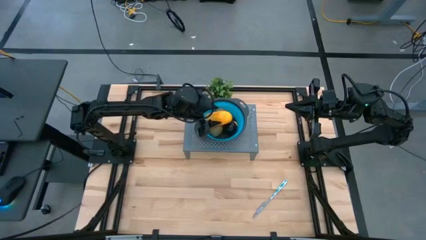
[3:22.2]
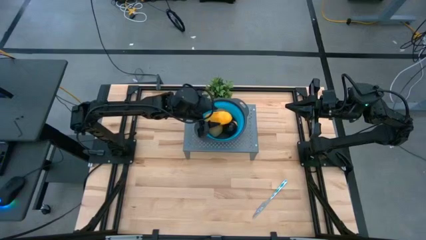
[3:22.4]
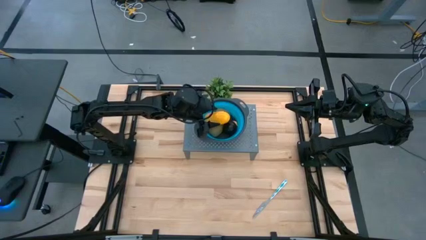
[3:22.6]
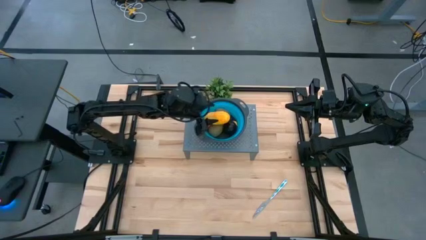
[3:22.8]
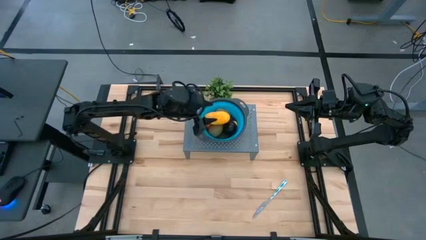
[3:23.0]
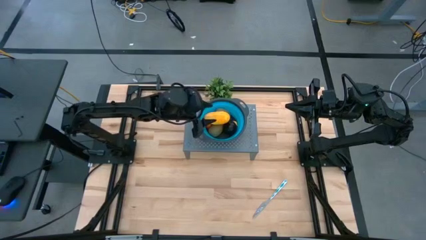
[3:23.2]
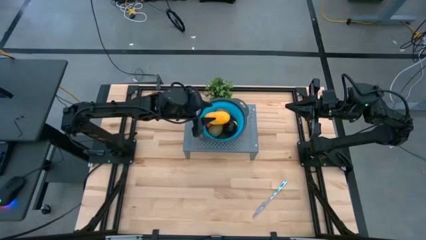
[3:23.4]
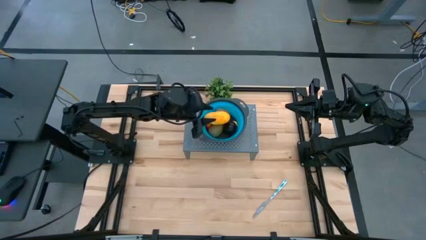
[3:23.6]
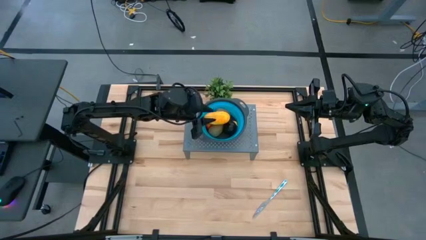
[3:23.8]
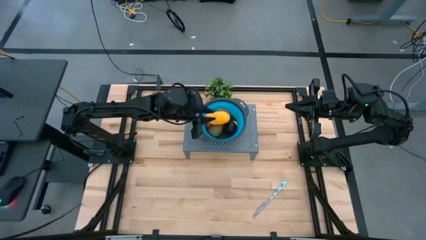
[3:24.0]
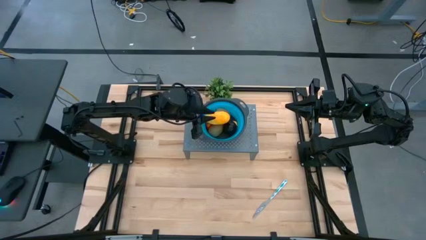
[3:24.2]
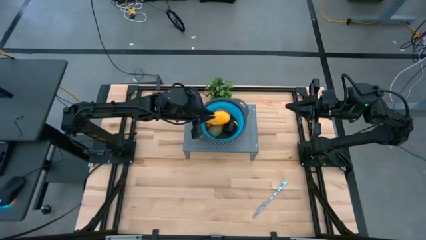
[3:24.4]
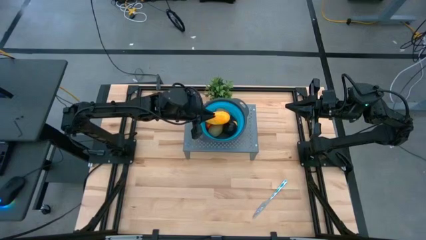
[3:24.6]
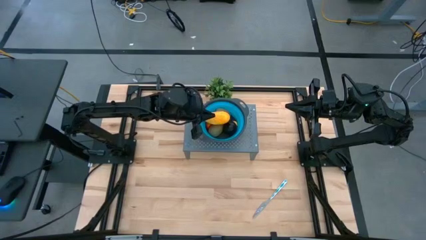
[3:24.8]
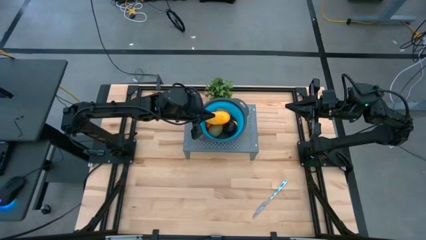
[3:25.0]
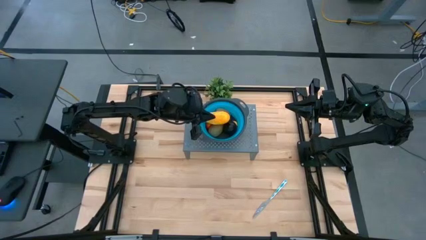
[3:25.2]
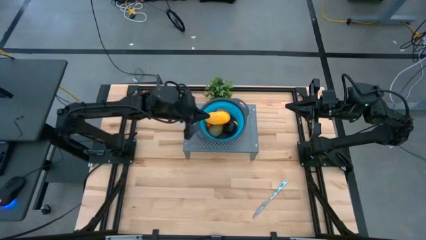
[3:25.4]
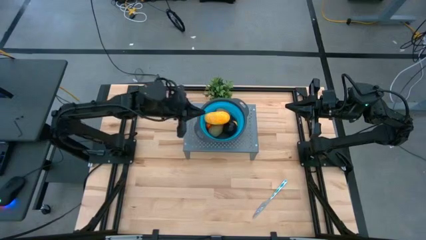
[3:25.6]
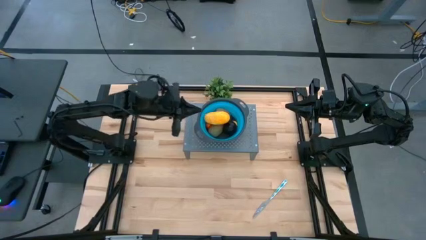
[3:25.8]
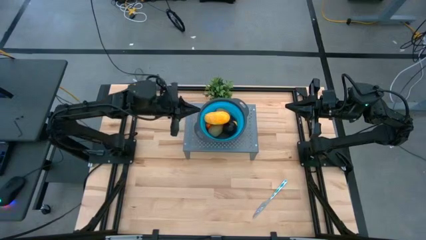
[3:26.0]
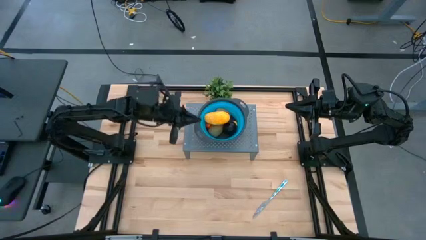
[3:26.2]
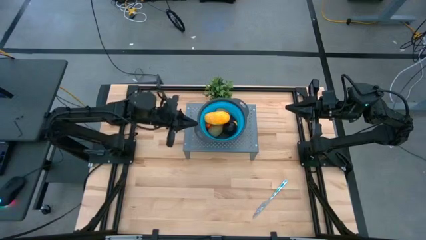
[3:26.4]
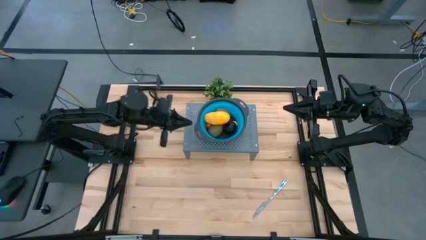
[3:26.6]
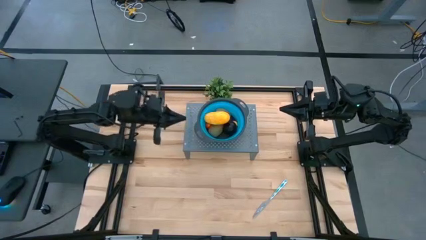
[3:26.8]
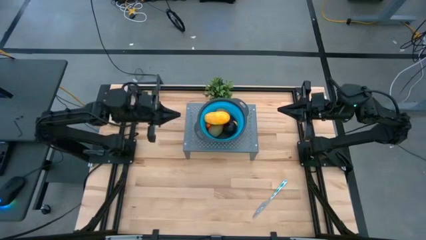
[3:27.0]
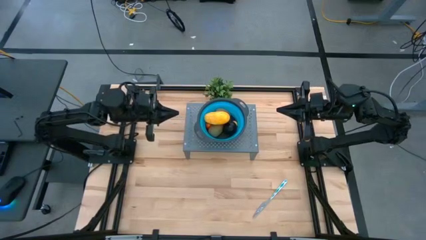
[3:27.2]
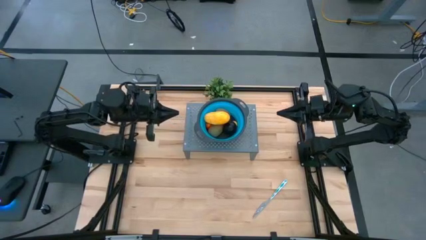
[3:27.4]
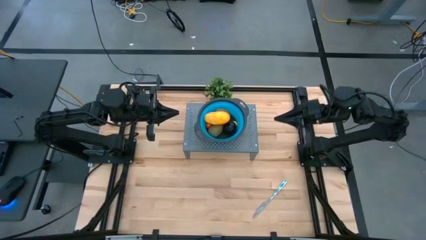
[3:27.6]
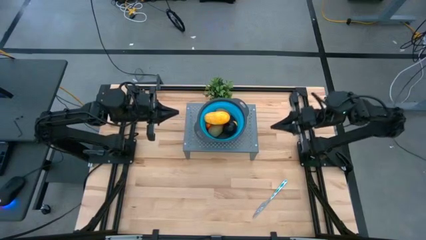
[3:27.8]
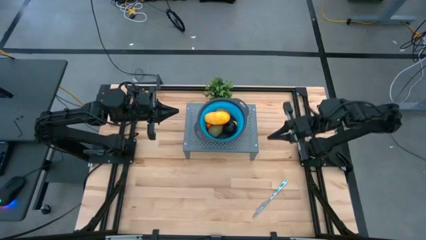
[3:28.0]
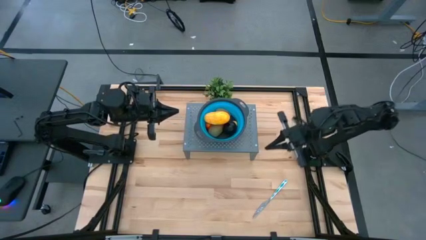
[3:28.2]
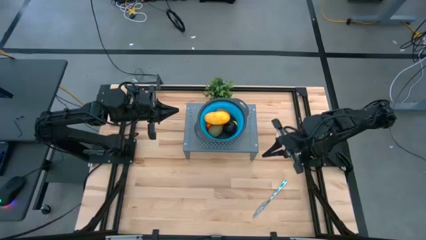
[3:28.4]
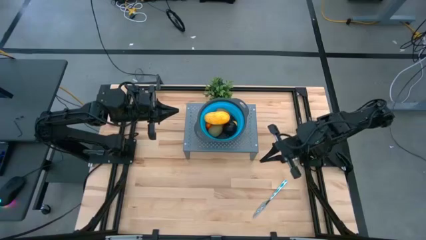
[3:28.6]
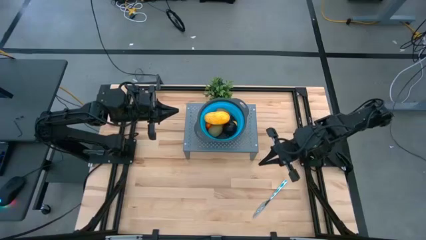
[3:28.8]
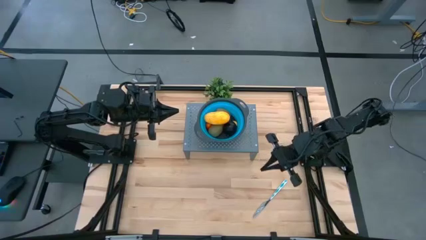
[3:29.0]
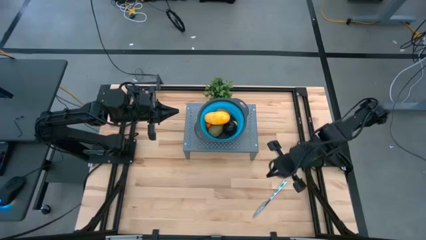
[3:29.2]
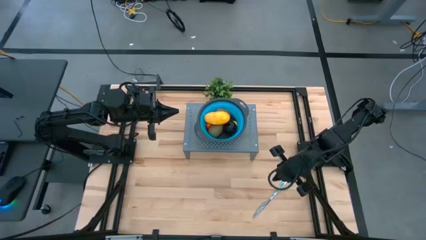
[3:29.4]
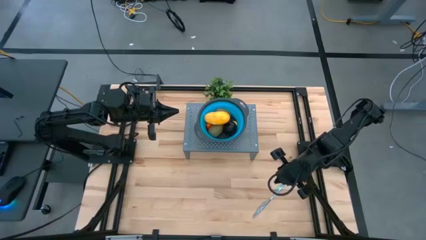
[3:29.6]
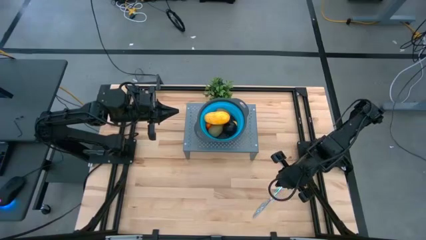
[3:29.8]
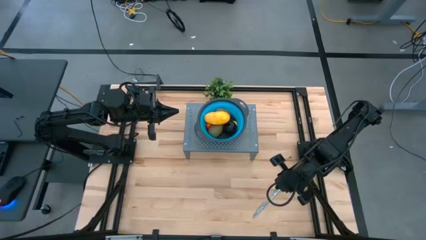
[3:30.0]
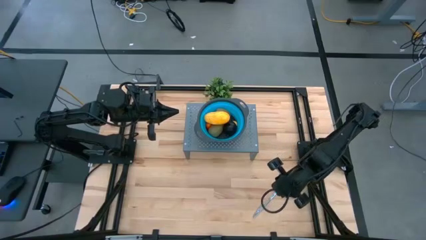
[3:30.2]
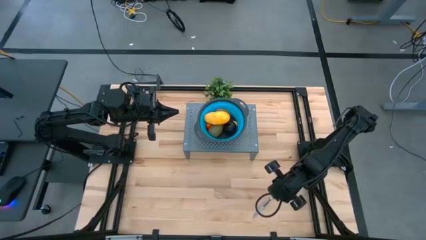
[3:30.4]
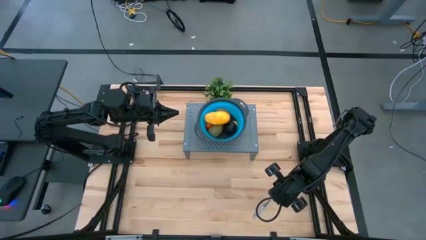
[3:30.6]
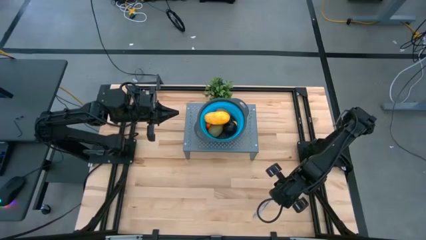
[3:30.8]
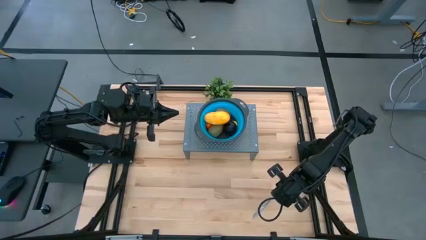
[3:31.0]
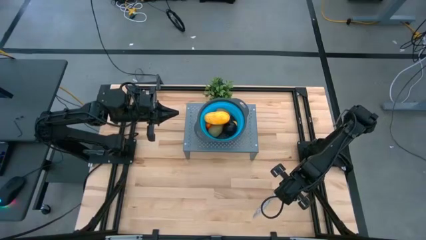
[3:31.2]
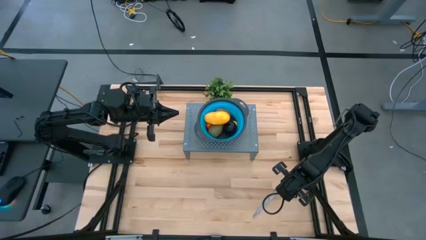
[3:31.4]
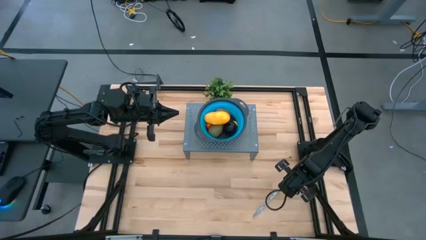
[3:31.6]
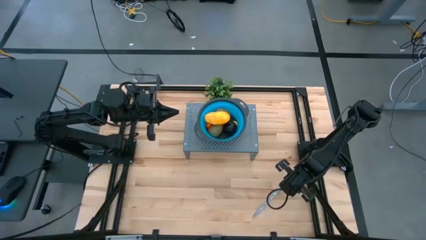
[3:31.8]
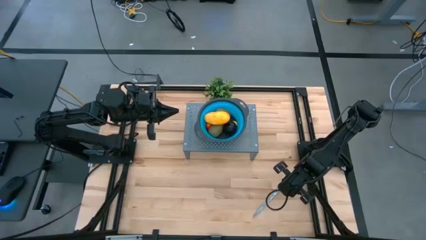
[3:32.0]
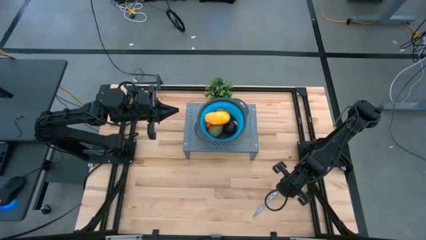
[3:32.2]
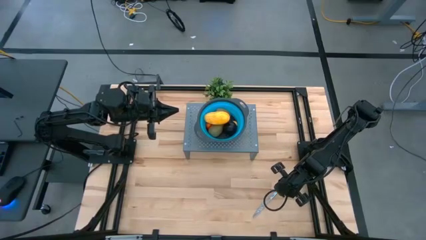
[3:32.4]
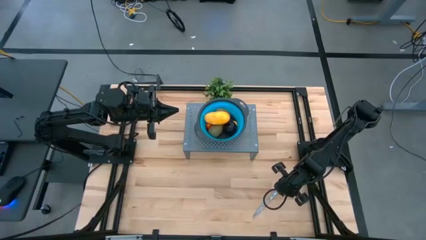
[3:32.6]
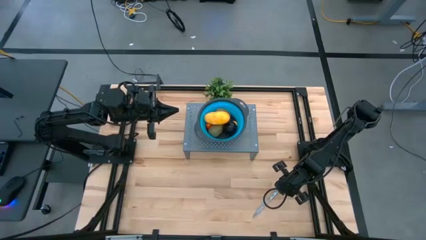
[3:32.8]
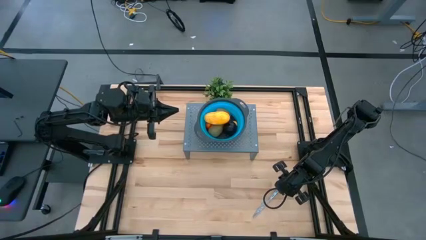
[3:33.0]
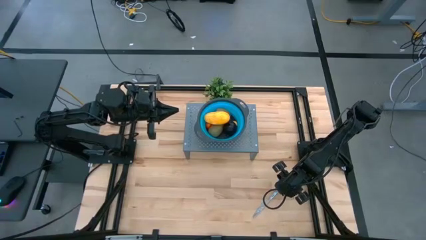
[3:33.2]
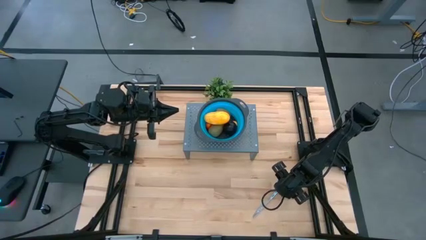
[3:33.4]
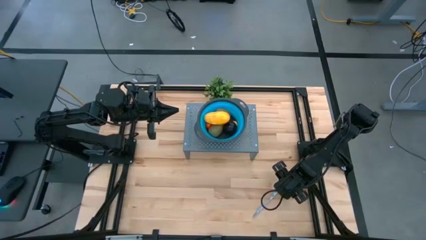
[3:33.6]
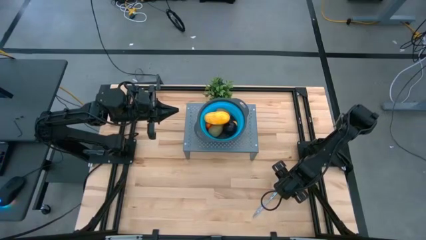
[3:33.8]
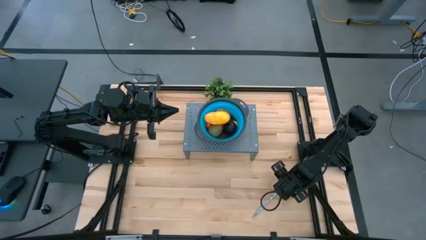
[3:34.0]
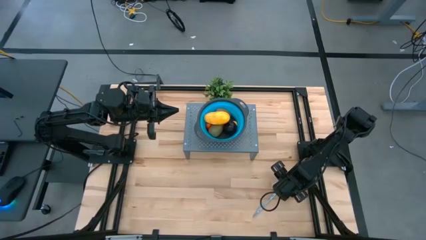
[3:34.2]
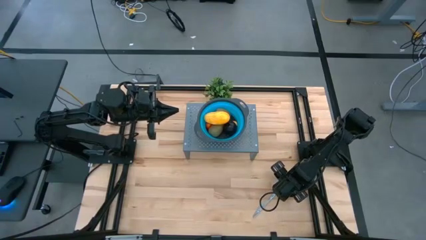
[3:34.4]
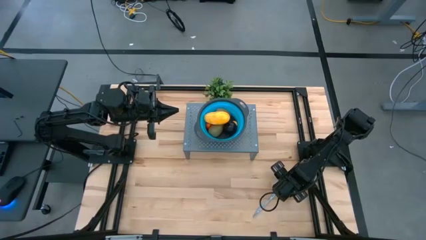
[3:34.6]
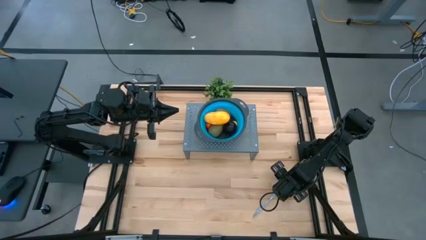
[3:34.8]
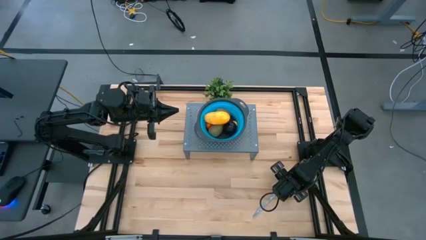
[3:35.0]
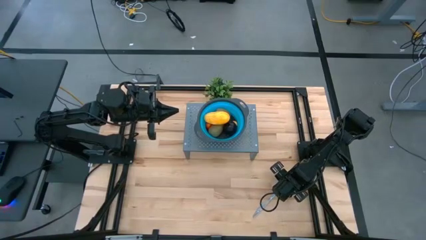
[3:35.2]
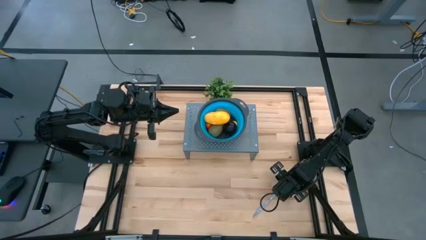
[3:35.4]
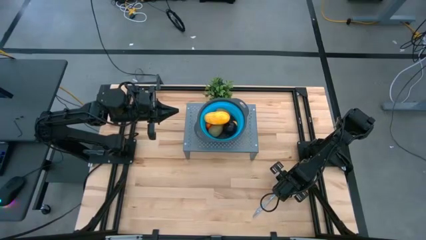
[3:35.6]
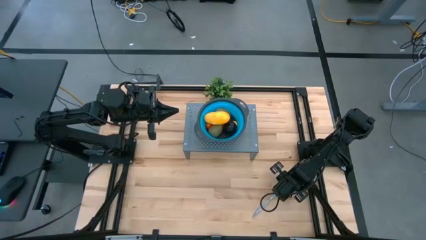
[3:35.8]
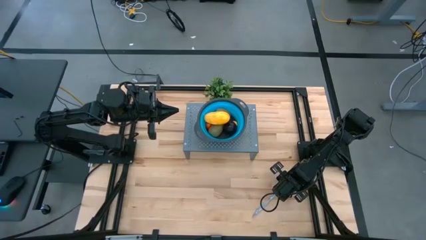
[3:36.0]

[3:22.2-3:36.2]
Task: Pick & Place Fruit
Put the knife on the shelf

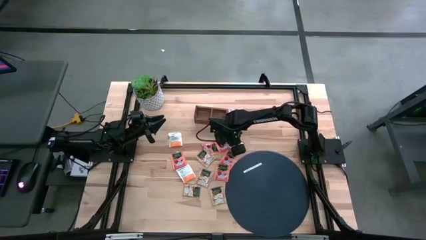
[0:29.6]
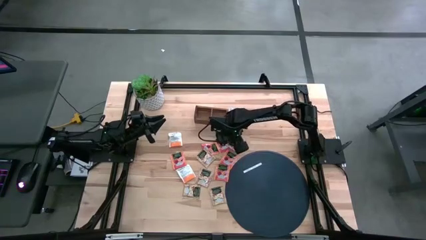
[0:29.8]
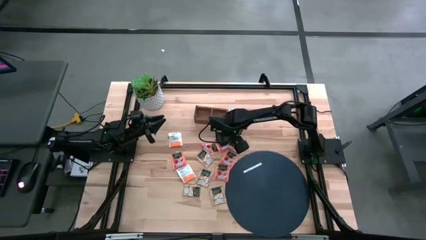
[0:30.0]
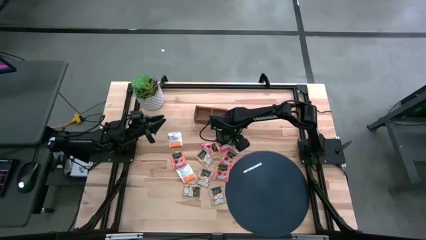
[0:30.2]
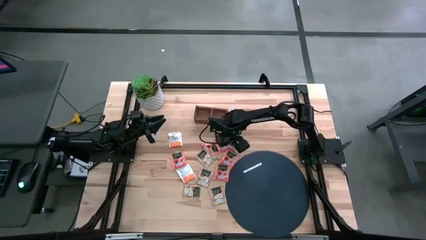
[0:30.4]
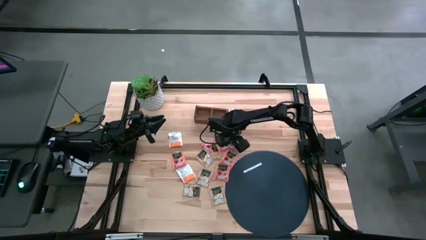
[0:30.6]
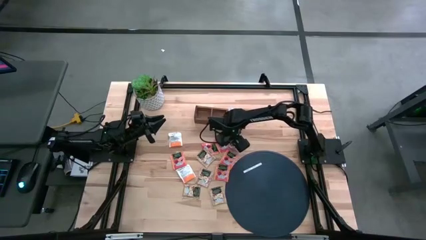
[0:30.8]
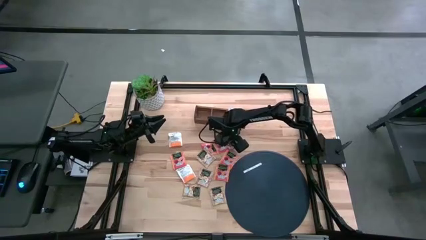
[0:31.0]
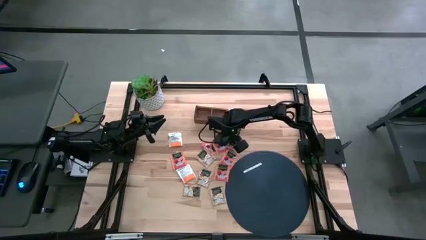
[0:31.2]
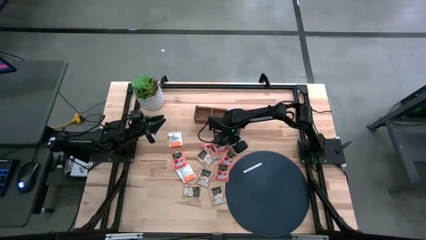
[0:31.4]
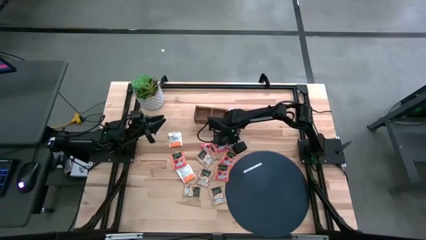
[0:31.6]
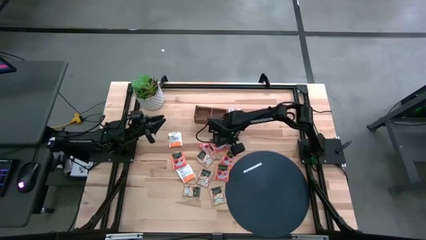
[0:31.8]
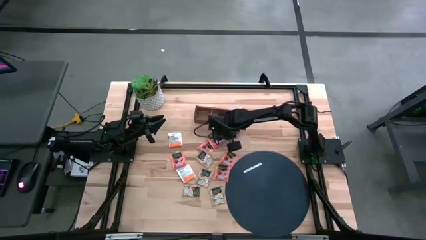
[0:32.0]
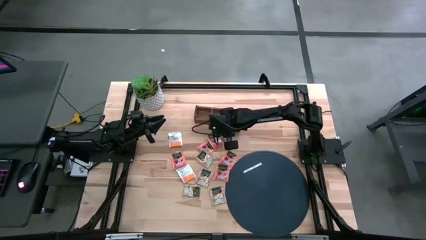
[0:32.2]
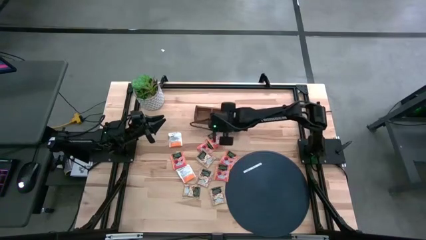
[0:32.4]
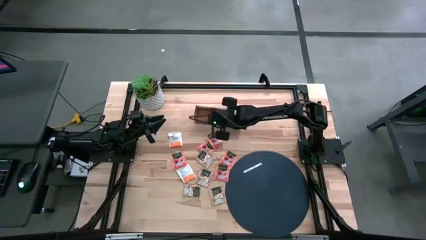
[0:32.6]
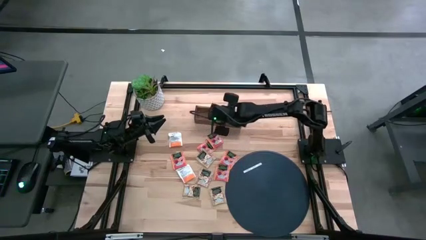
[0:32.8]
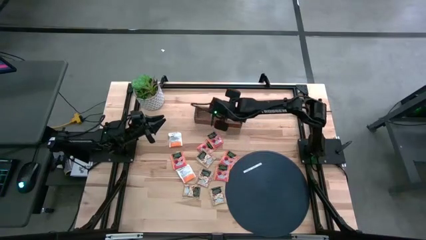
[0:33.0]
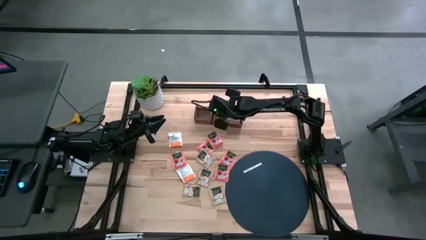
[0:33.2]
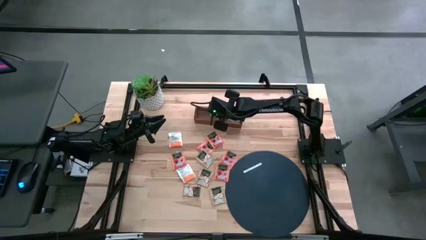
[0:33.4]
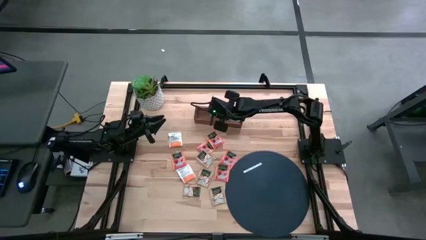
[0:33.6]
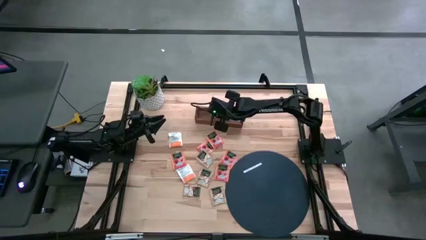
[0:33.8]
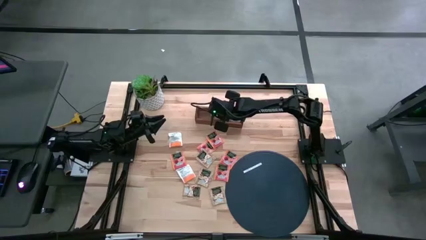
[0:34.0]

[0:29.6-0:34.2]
Task: Pick & Place Tea
Put the brown tea sachet into the middle section of the wooden organizer
